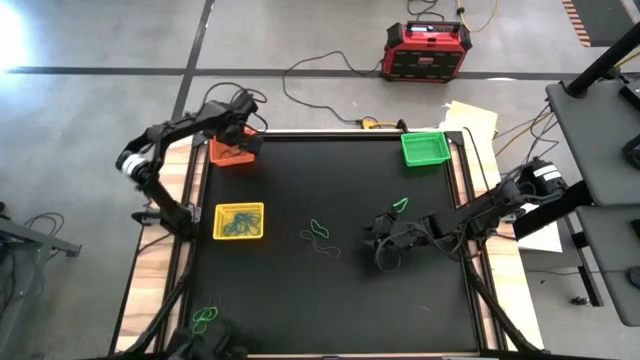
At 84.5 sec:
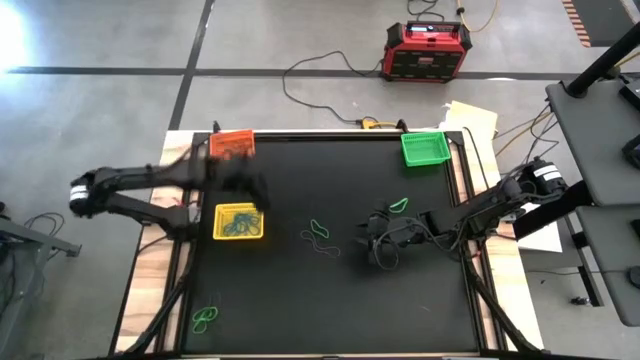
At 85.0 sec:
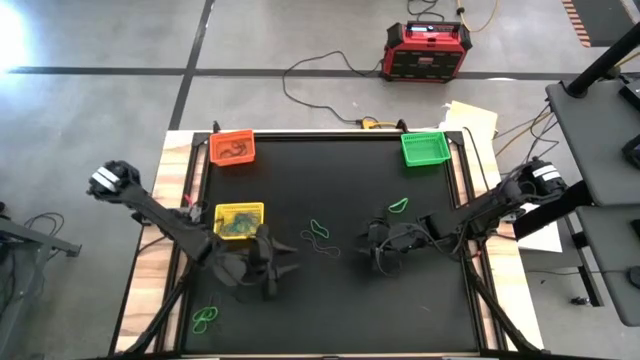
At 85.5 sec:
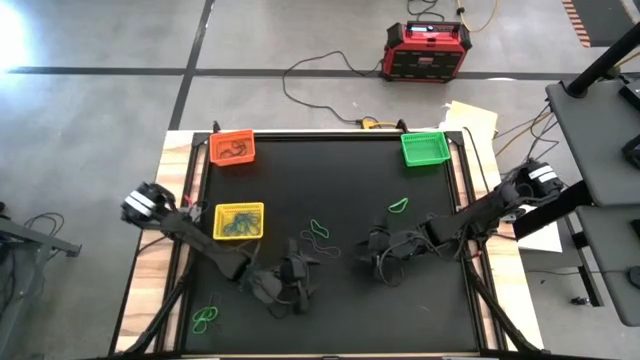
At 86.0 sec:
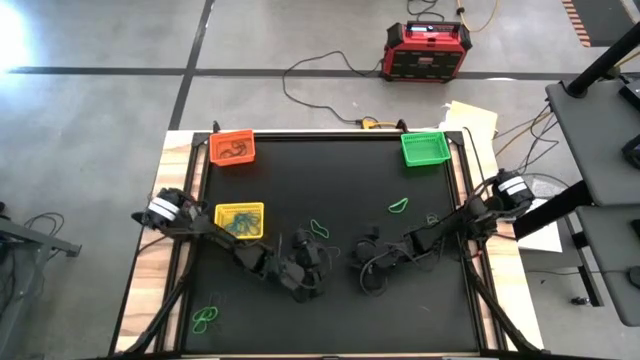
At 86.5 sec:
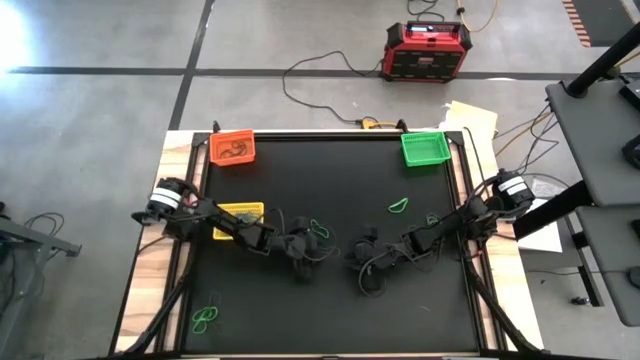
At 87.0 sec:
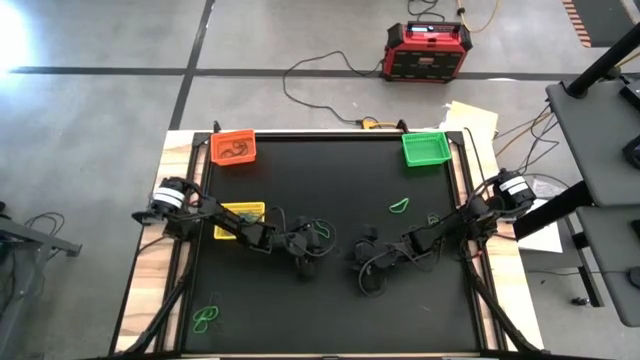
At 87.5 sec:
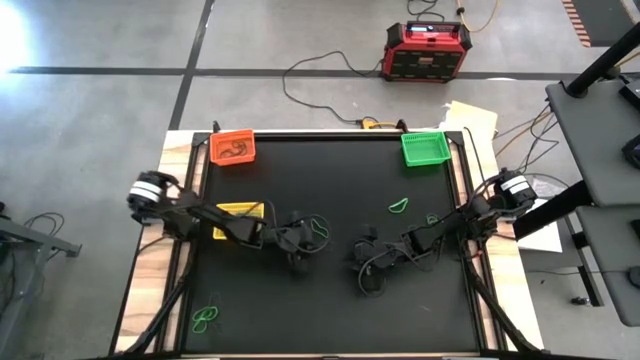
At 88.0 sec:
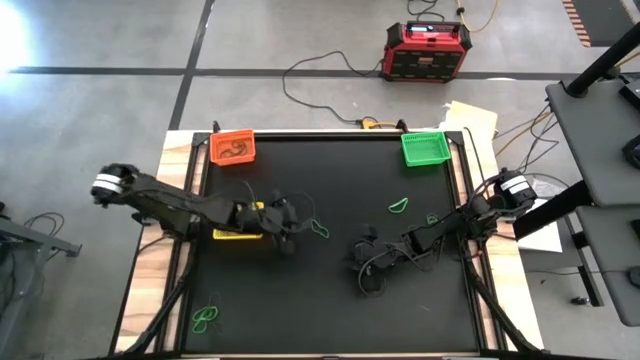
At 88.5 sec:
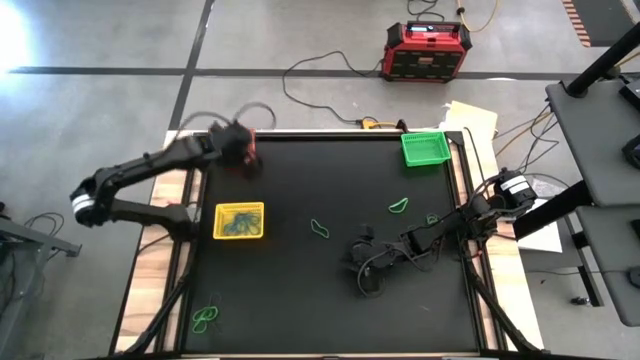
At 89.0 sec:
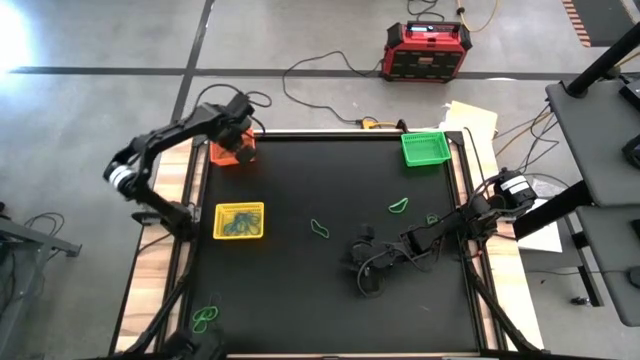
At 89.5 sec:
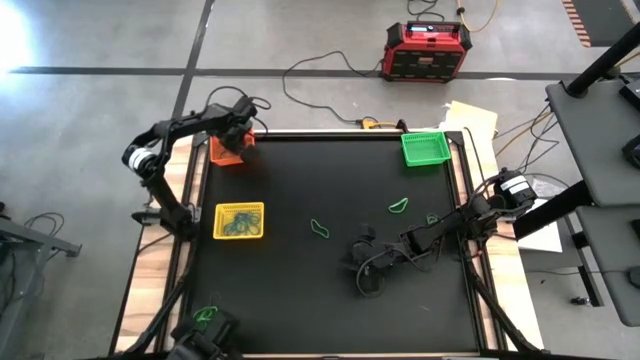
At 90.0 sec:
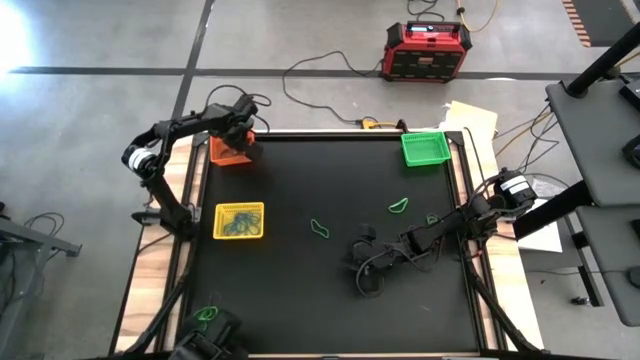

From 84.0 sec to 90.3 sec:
Task: Sort rubber bands into baskets
Put the purple rubber band into the orange bin

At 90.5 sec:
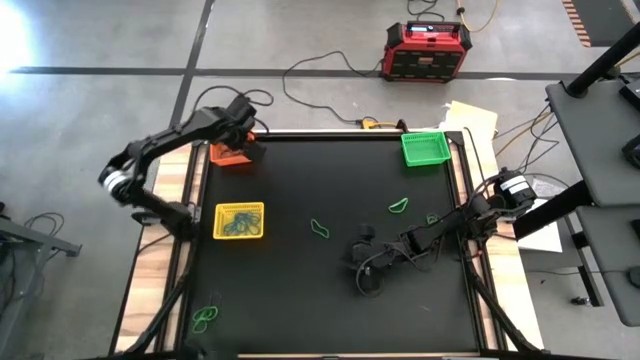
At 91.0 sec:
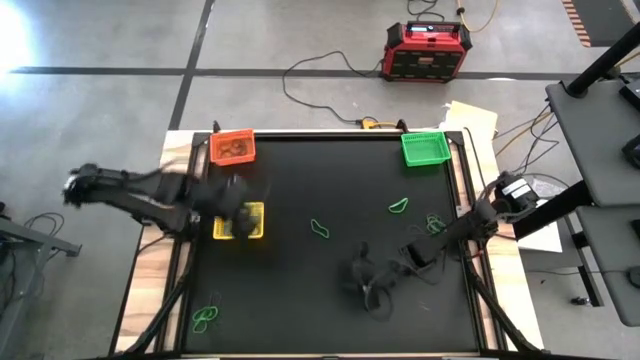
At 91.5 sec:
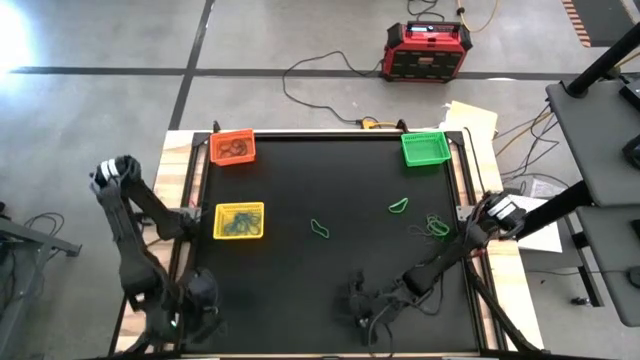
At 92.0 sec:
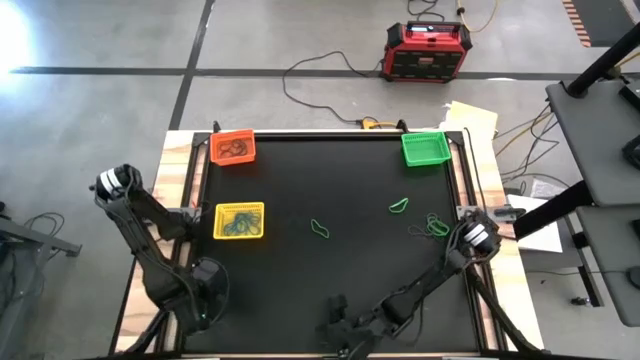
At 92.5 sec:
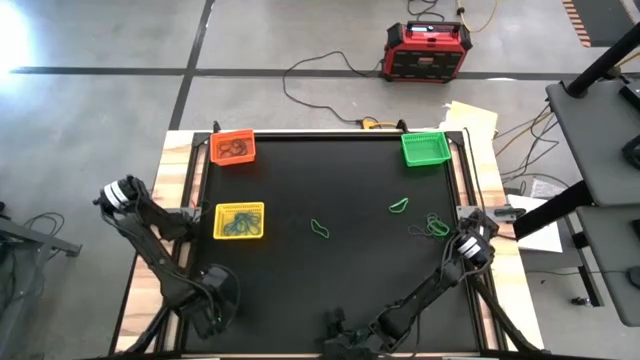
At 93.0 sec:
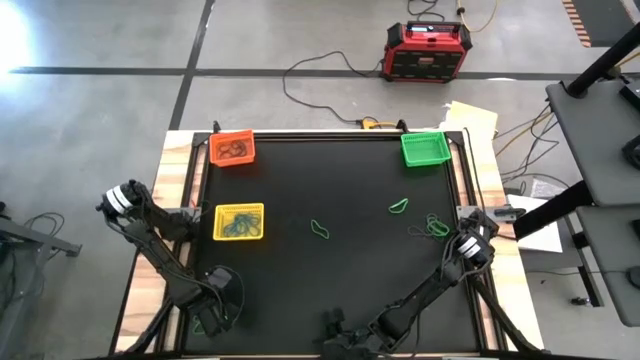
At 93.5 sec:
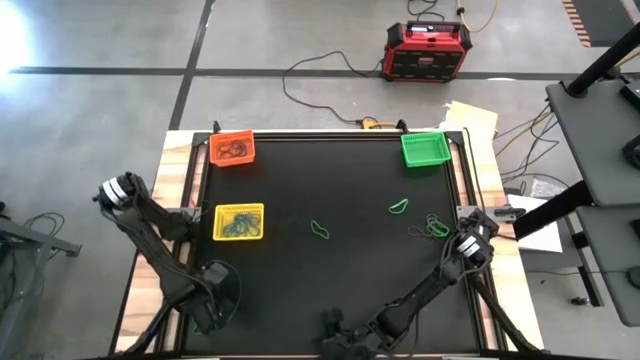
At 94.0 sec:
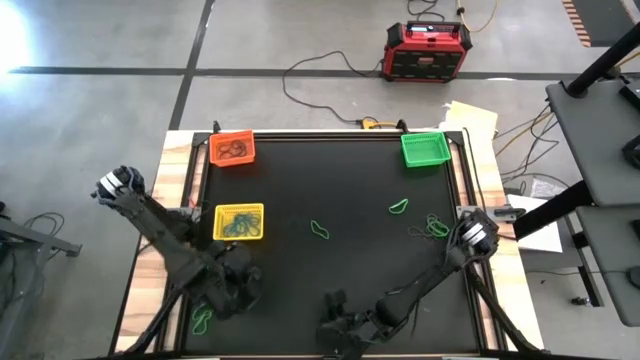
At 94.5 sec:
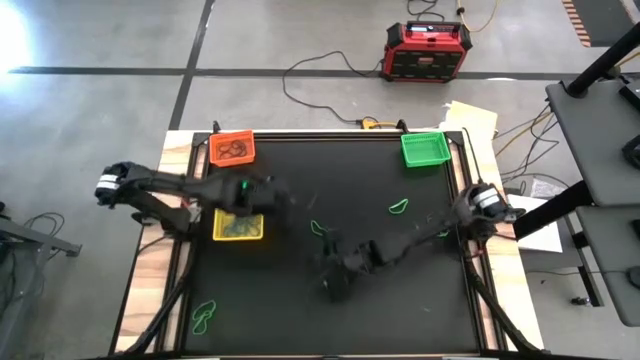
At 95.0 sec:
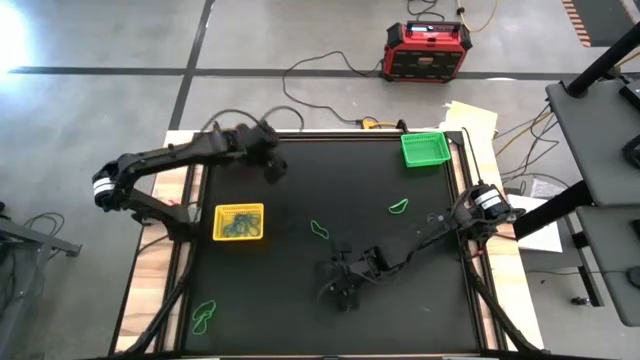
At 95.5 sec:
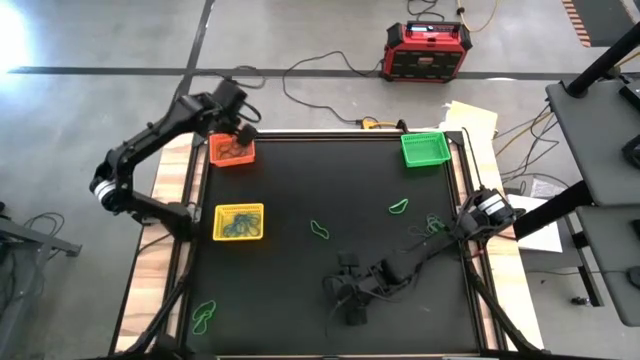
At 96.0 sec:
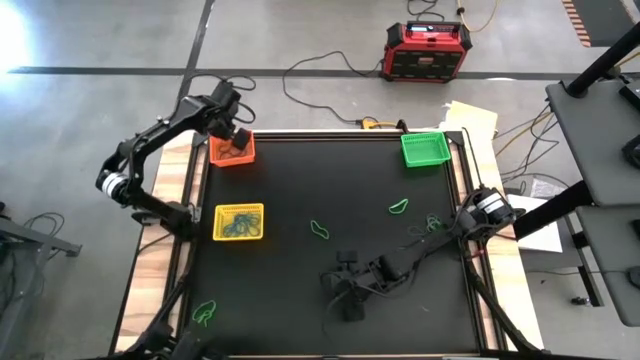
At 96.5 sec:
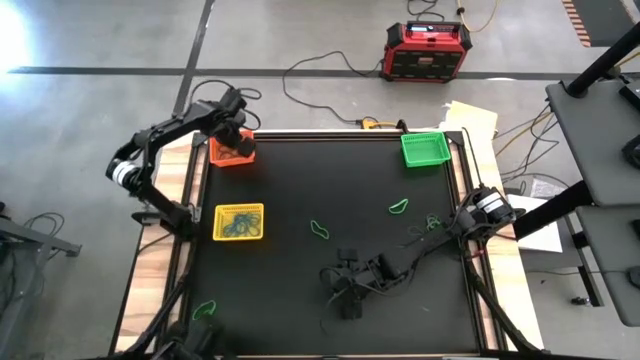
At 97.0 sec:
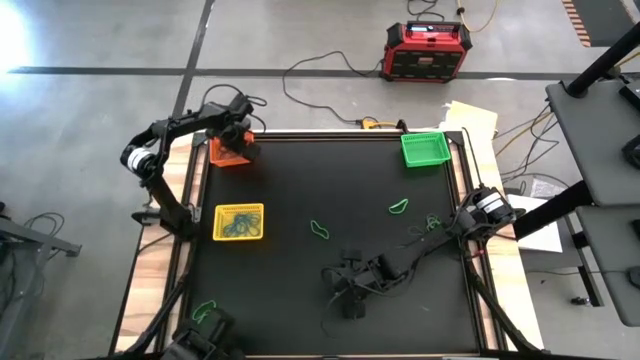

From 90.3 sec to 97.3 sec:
Put the purple rubber band into the orange bin

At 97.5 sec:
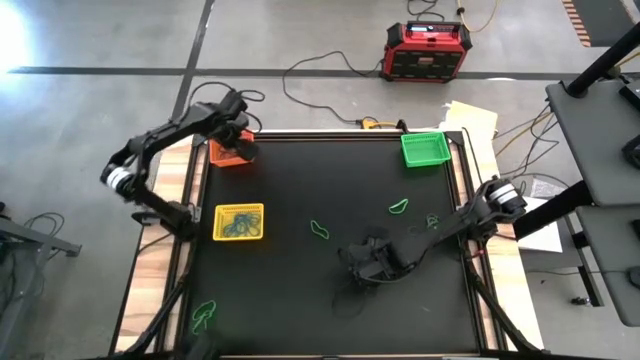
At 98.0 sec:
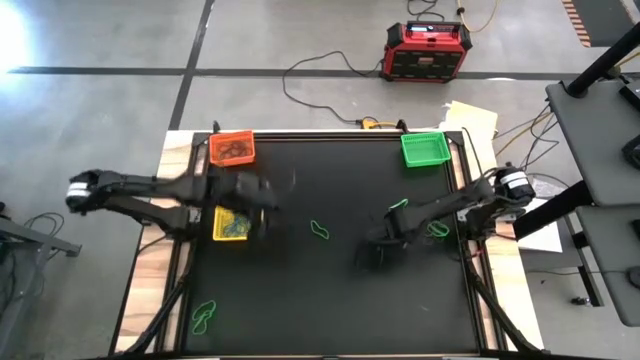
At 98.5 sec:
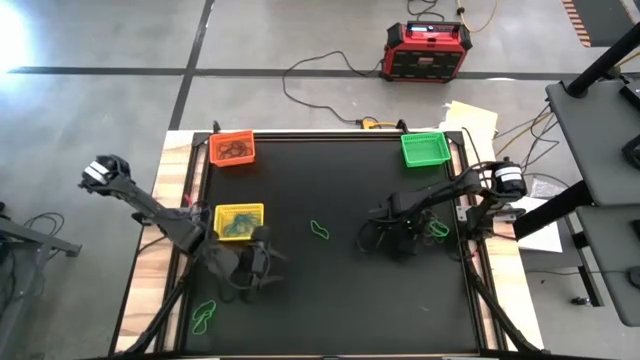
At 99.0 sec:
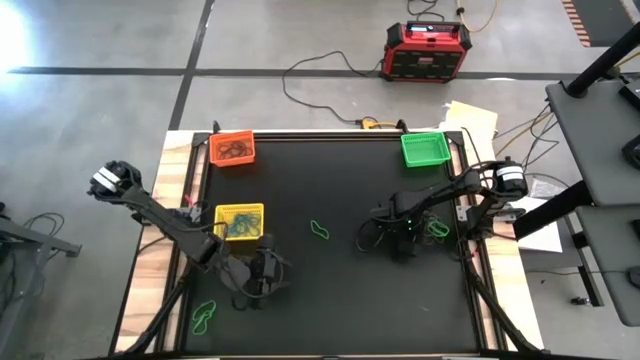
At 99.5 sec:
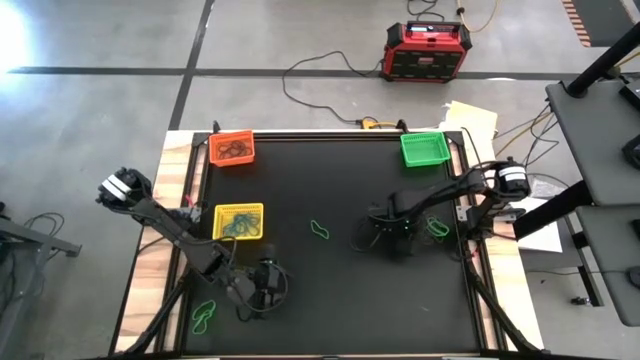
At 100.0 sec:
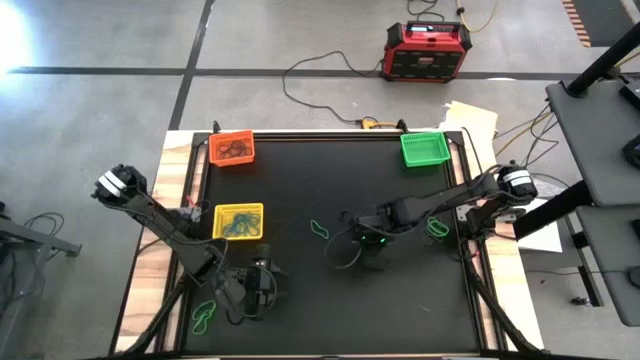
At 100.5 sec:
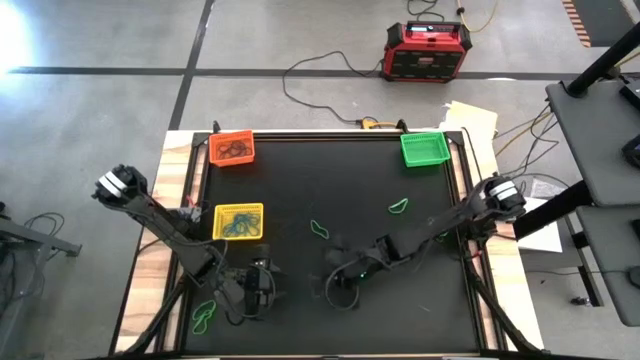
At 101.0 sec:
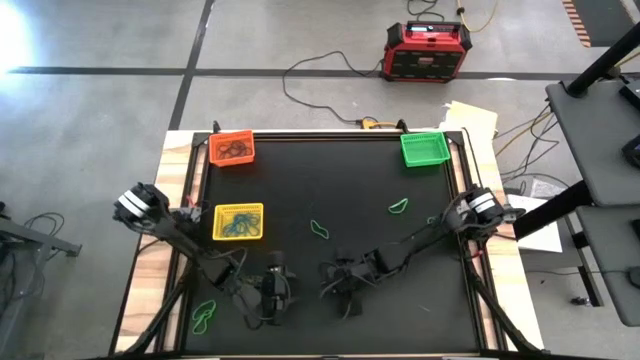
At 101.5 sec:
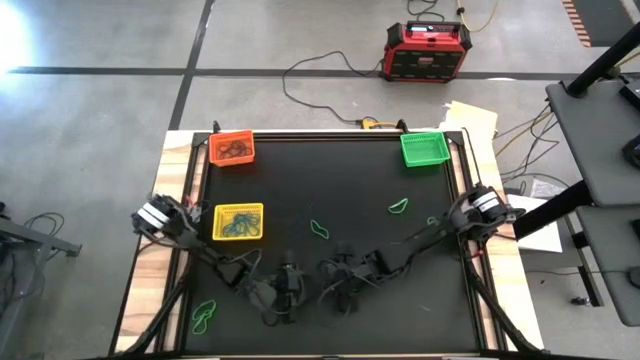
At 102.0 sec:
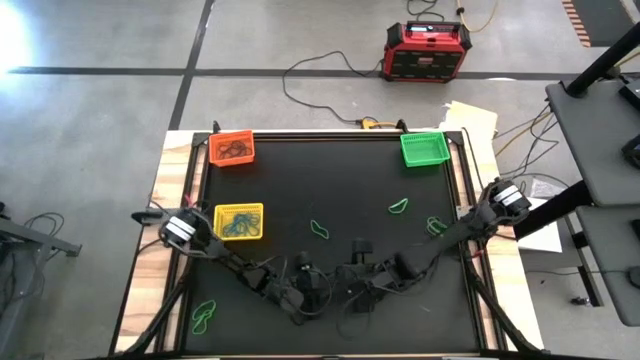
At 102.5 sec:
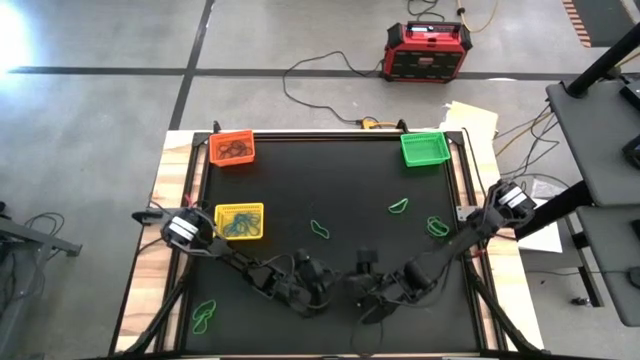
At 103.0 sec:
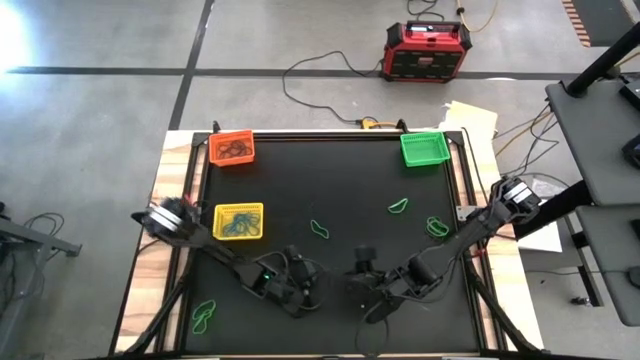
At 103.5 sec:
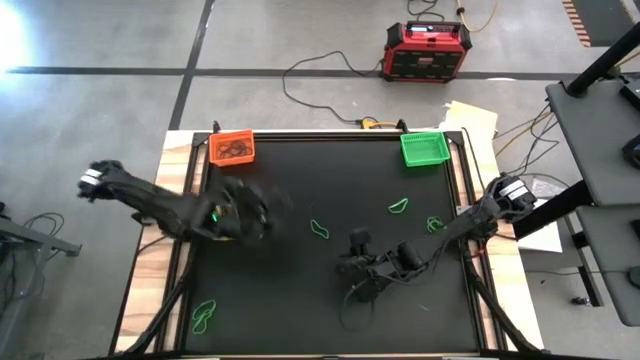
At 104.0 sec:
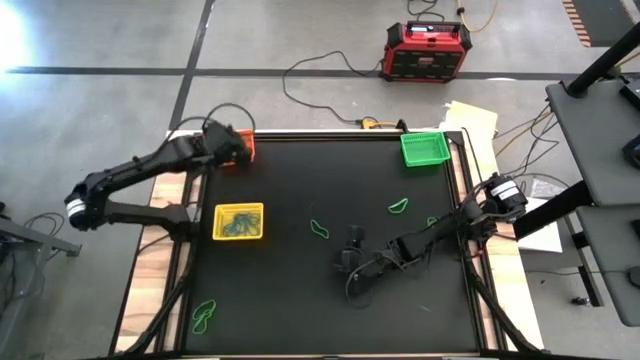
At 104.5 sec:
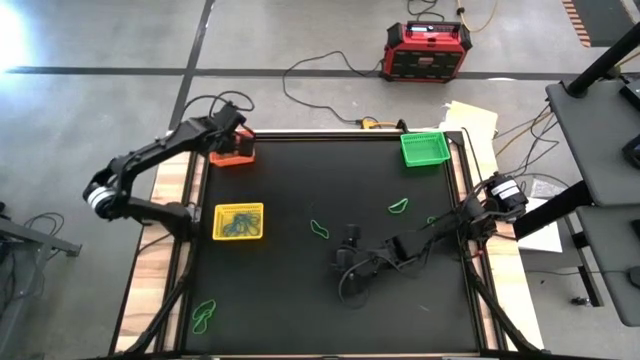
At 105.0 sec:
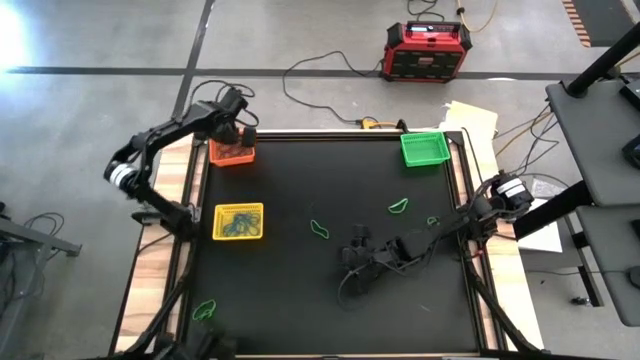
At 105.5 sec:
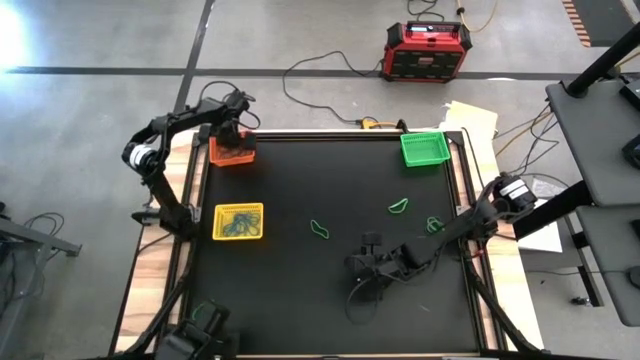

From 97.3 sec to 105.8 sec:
Put the purple rubber band into the orange bin
